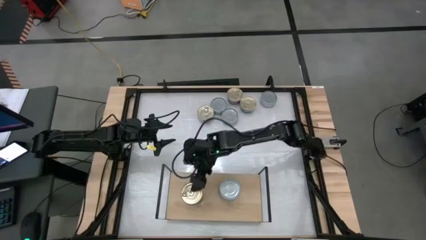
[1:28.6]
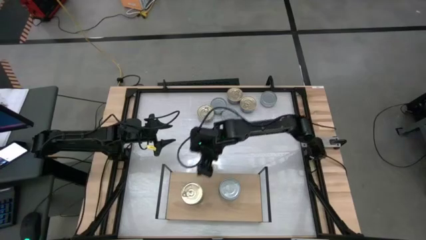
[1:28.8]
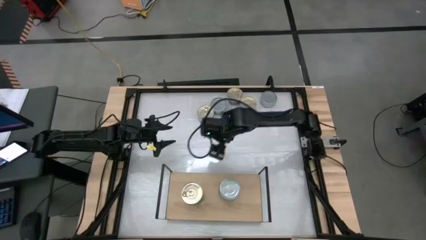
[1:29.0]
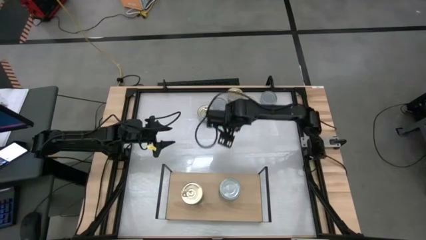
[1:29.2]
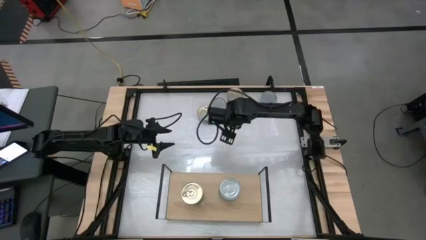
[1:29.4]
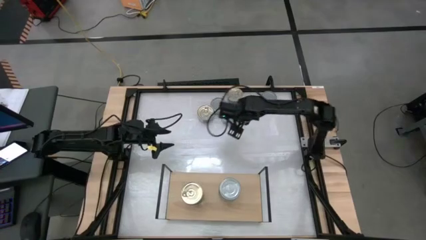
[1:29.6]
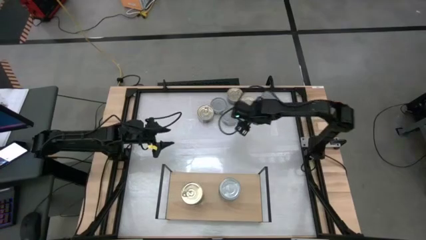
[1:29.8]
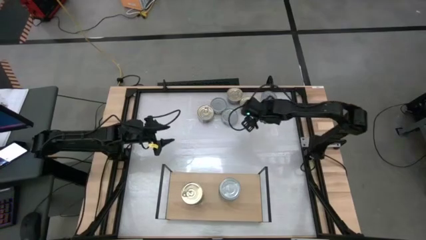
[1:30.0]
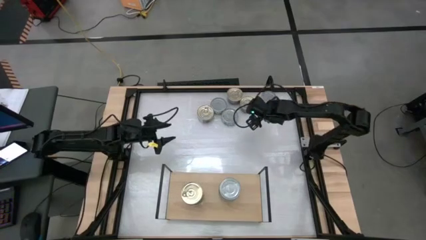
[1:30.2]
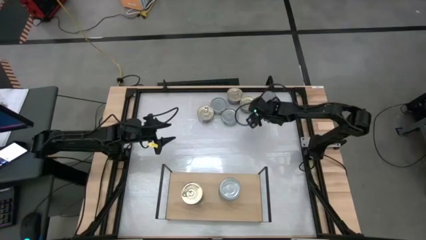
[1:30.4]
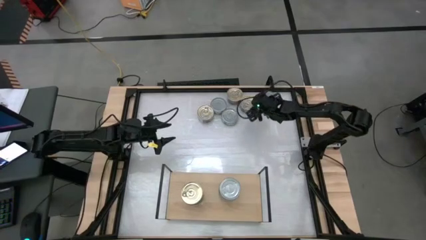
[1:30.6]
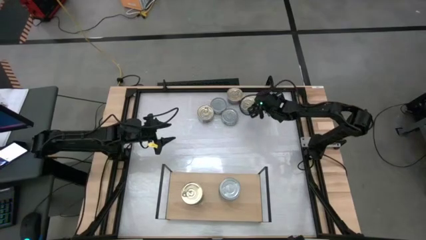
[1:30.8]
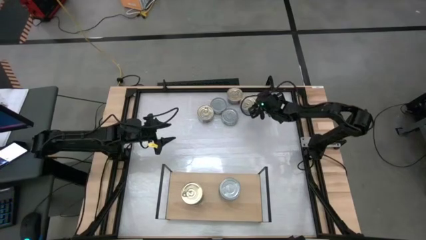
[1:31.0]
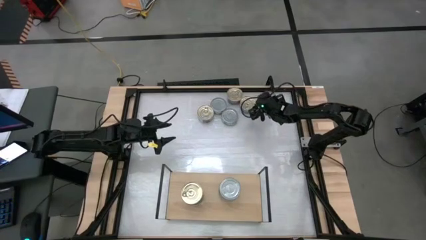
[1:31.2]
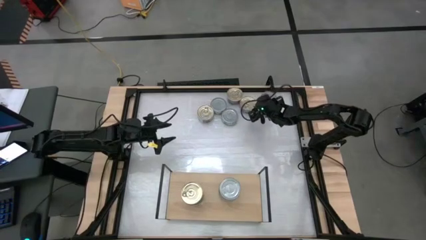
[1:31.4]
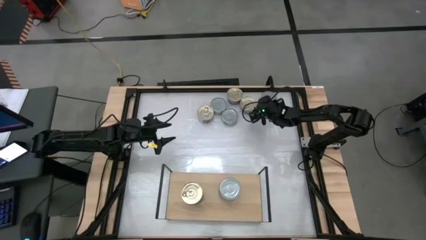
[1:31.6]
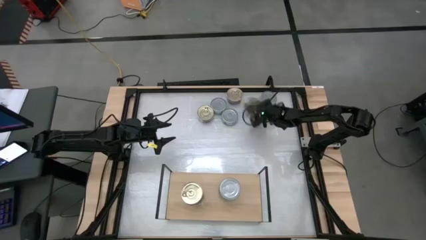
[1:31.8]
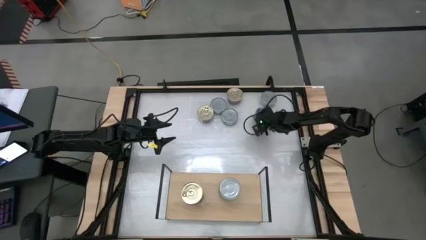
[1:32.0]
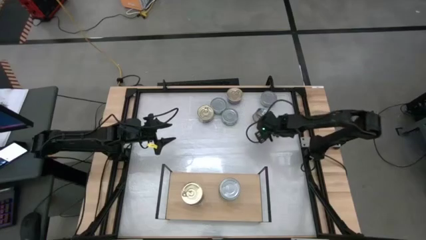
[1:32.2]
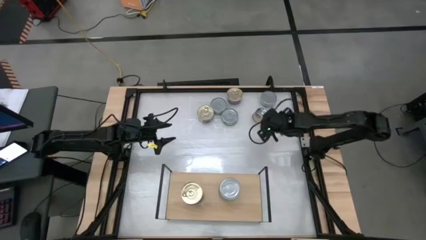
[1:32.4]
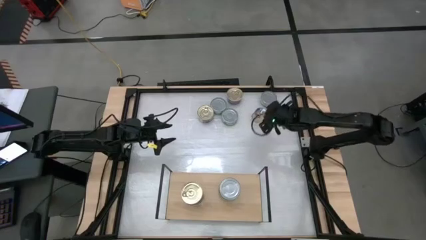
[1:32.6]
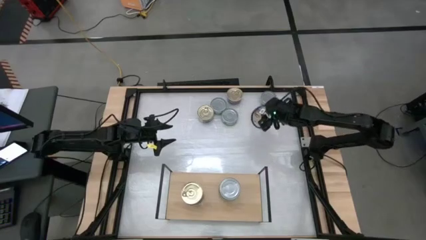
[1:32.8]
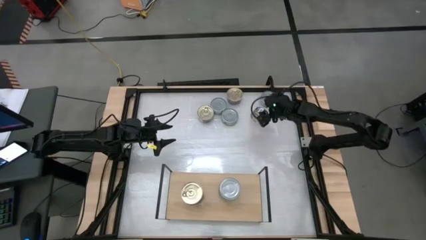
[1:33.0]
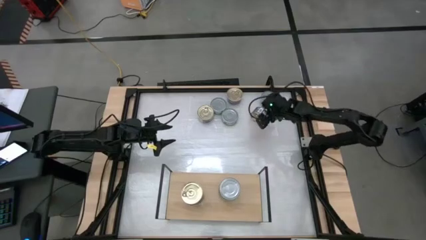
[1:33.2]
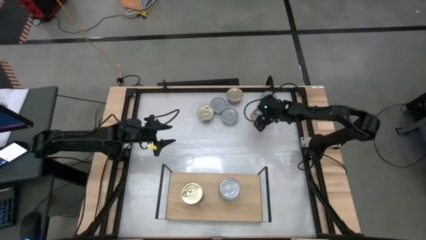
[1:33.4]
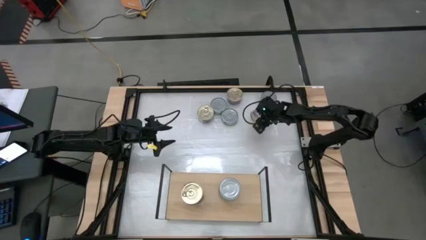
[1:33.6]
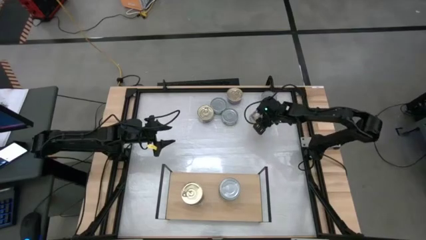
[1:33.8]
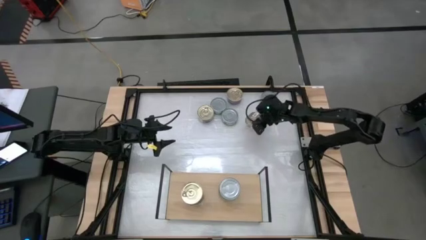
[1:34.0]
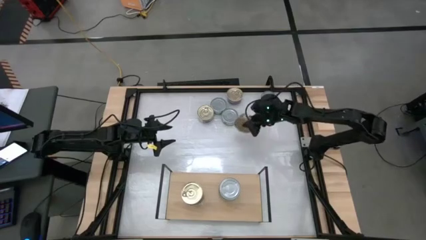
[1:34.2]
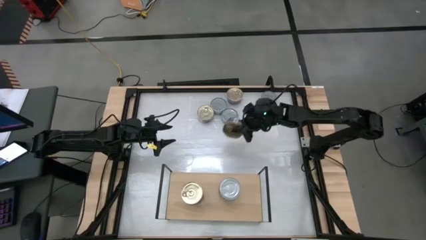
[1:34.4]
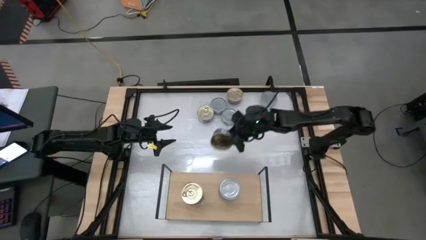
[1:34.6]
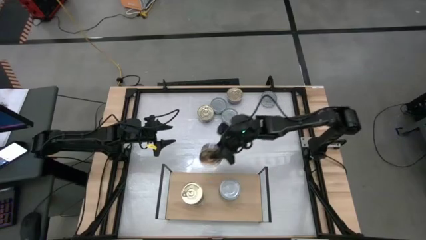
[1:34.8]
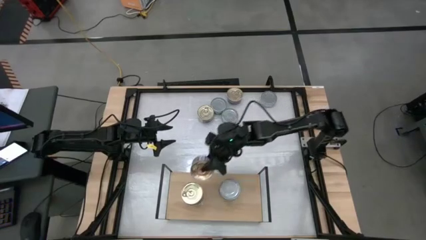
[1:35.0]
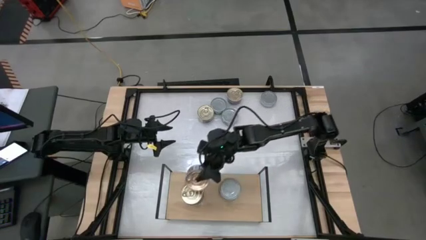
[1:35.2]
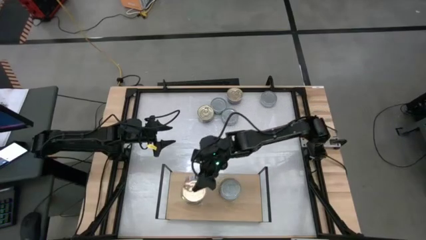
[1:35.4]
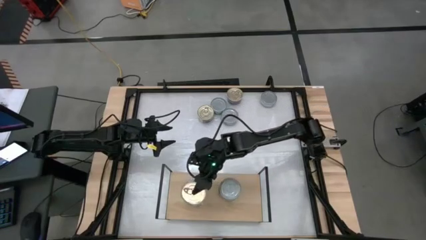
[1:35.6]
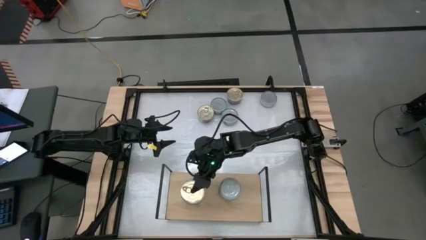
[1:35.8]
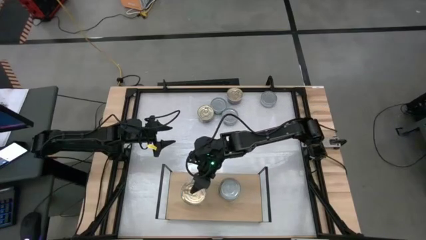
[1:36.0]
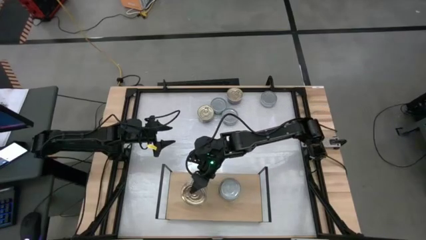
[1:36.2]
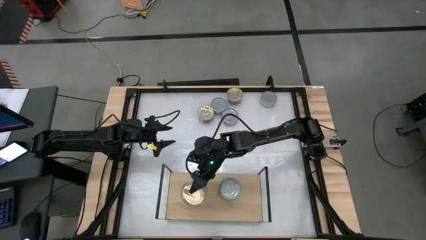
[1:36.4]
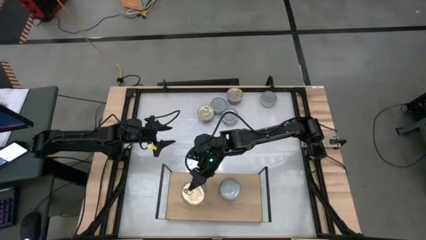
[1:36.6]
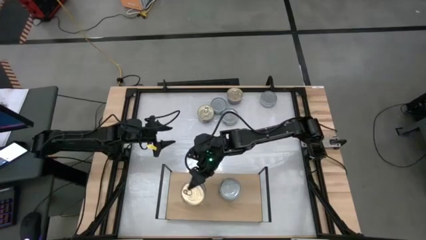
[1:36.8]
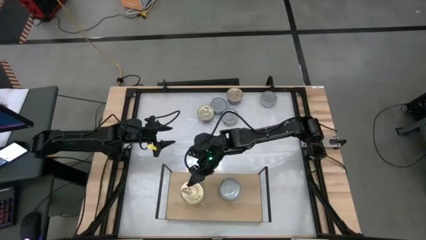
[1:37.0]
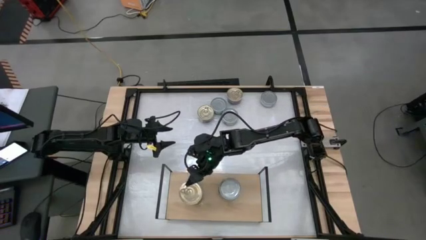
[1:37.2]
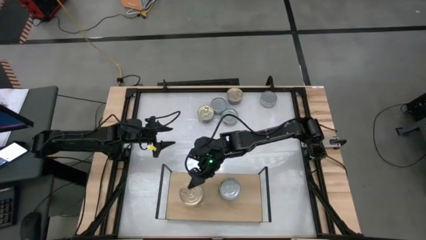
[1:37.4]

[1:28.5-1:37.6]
Task: Stack canned seafood by type on shelf
Stack the blue tuna can on top of the blue tuna can on the shelf

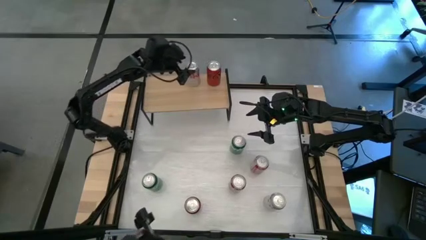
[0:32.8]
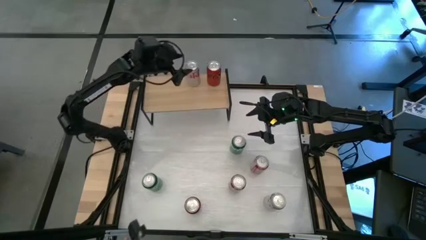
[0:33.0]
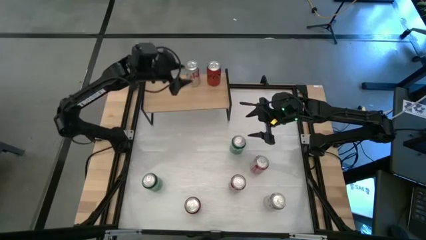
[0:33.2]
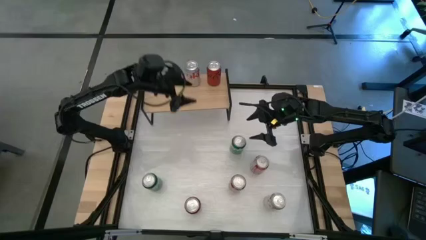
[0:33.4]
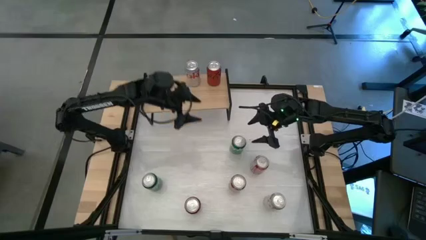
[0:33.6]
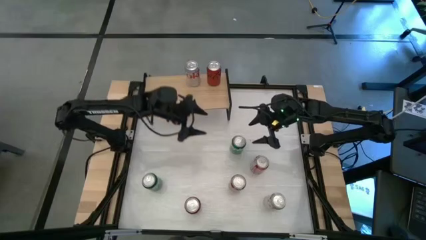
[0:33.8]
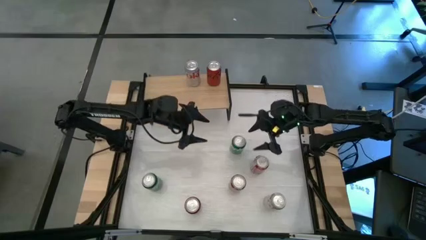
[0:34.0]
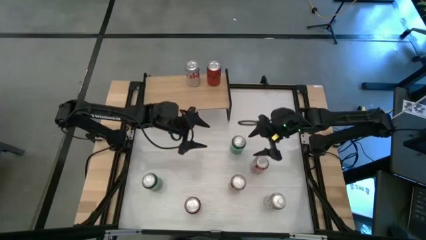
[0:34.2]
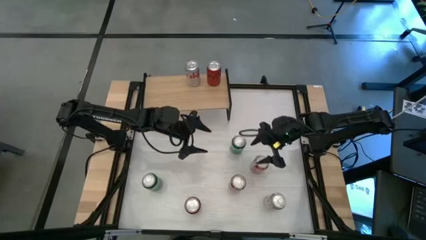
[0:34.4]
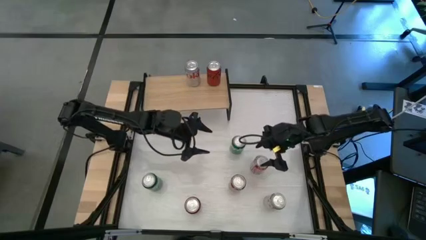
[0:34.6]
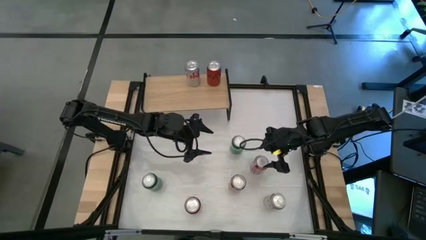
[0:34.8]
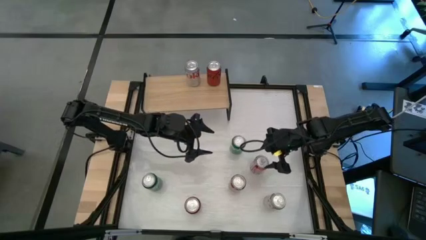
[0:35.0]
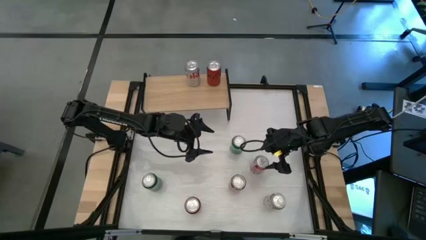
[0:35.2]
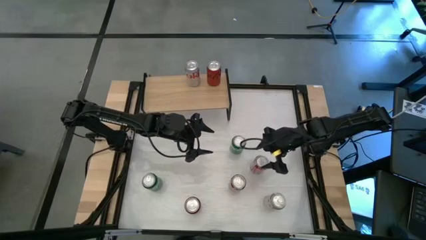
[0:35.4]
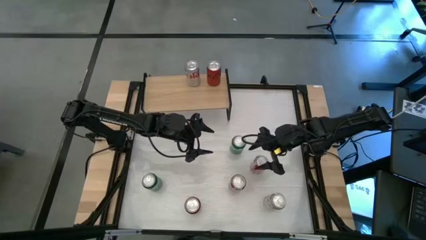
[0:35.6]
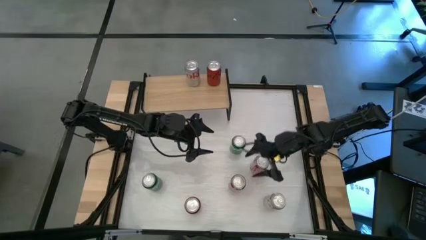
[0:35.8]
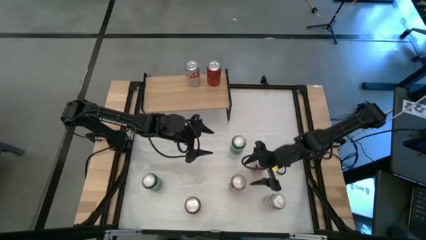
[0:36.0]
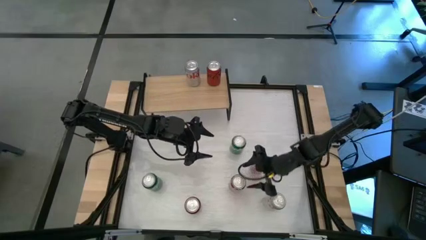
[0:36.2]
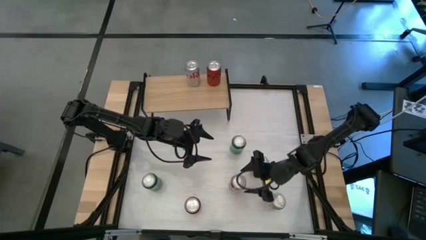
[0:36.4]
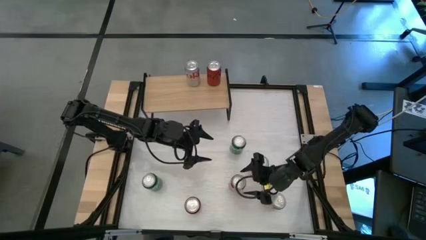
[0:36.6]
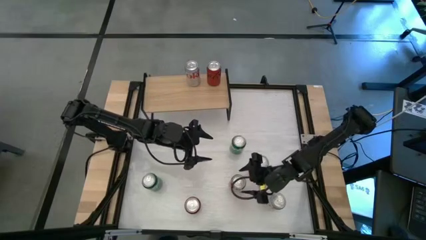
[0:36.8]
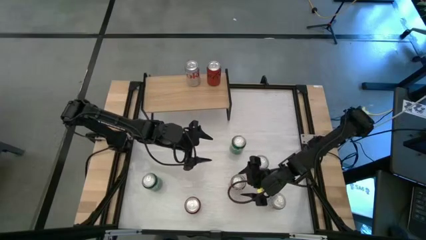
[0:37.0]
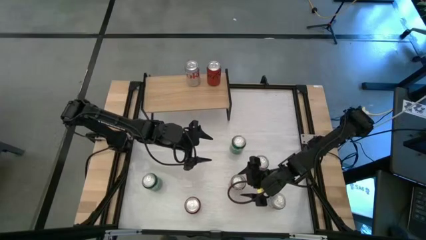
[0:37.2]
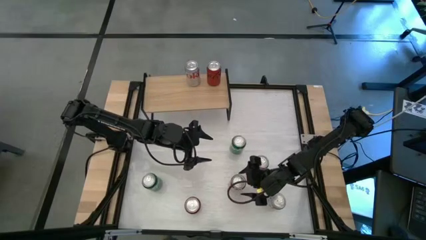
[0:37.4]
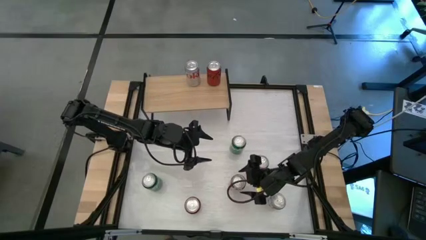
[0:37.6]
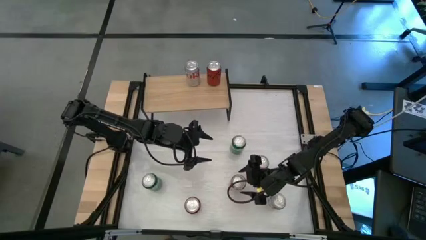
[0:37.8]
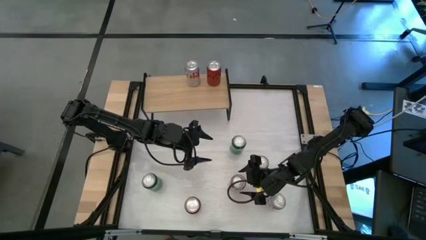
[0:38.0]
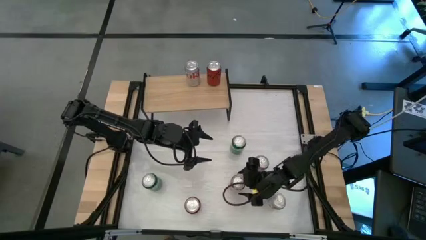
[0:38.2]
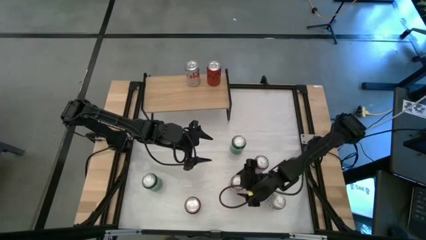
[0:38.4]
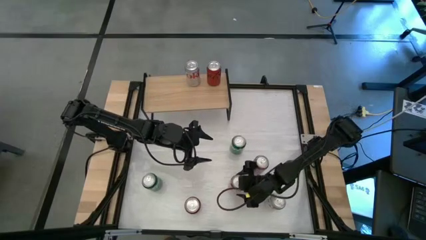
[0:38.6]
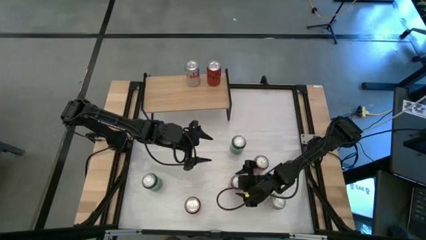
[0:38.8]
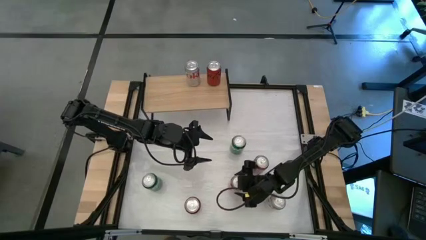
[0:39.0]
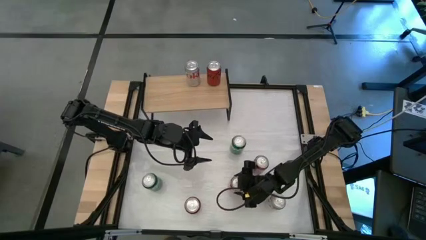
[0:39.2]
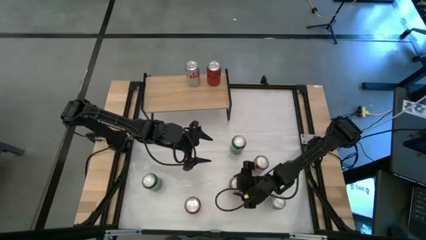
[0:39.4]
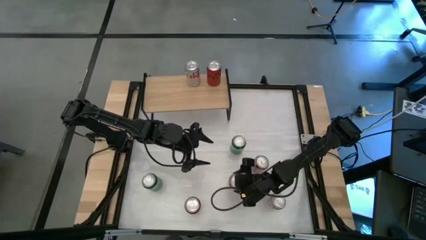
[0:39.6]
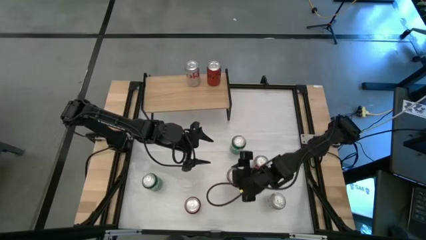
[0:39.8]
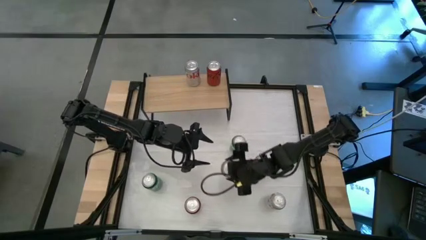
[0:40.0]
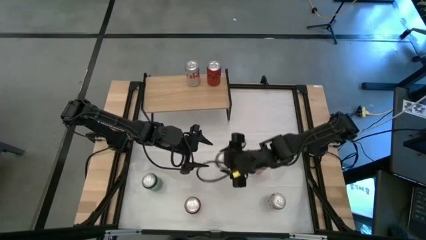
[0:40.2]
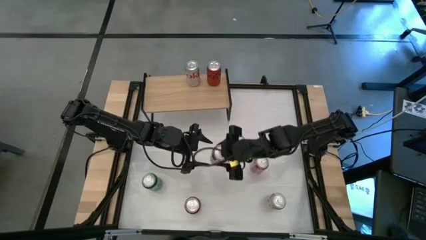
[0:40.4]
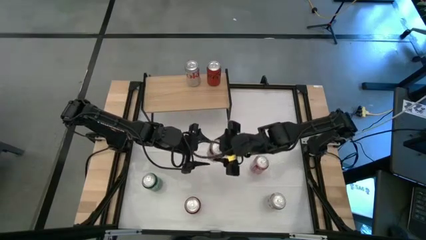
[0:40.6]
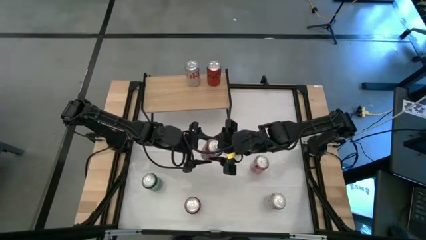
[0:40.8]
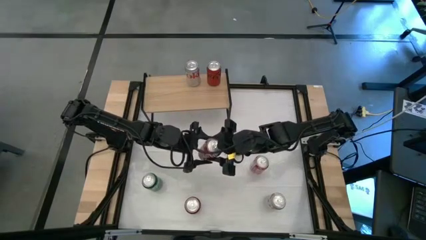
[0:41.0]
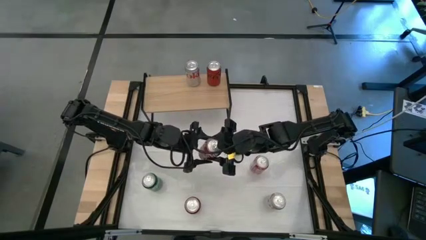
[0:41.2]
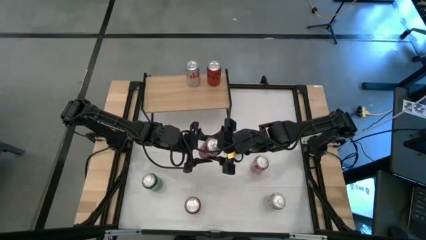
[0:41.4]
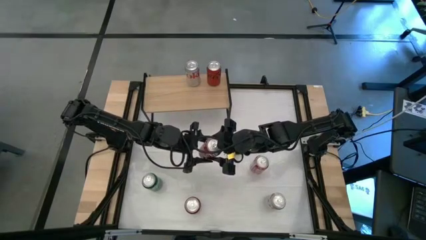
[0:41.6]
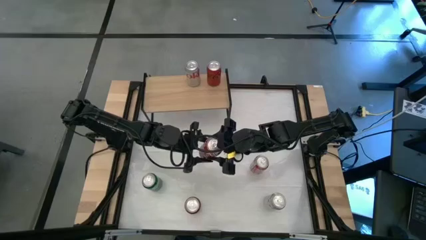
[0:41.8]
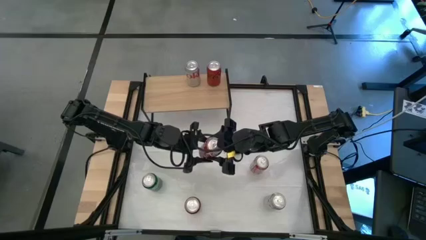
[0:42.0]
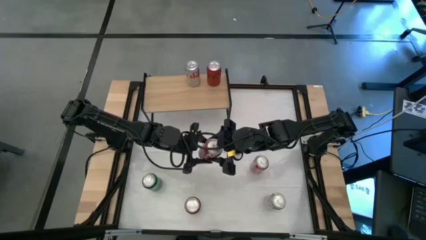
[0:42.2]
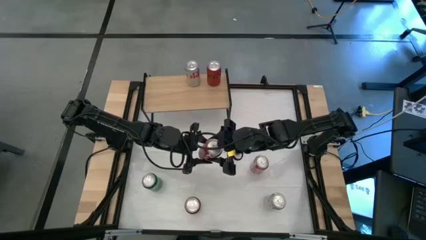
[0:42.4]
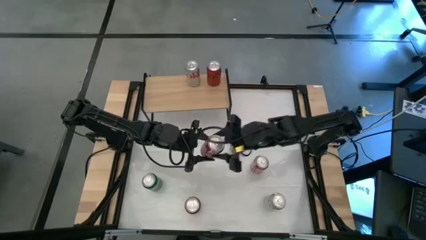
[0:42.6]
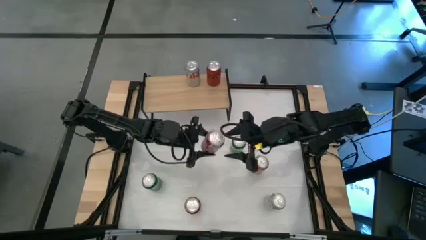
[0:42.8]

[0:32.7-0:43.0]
Task: Place canned beverage on shelf
Put the bottom red white soda can on the shelf
